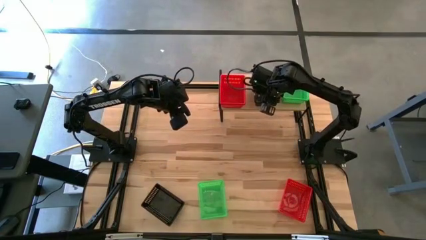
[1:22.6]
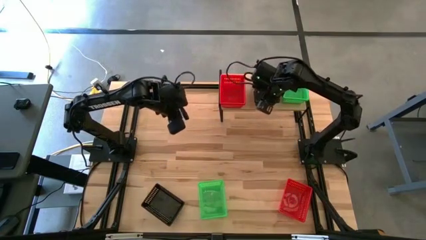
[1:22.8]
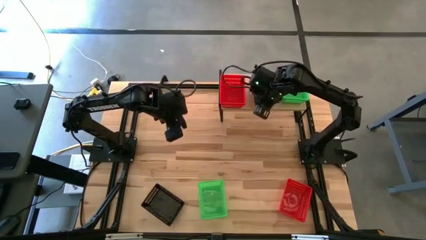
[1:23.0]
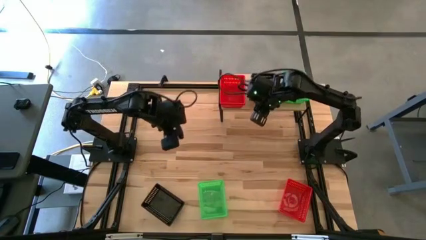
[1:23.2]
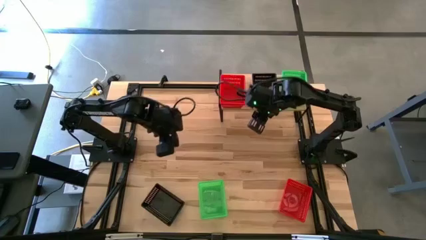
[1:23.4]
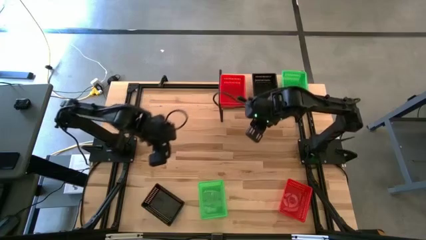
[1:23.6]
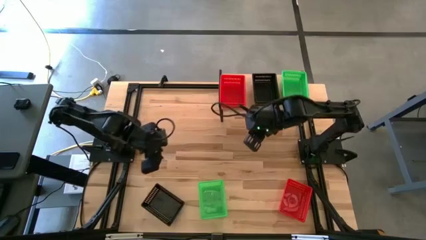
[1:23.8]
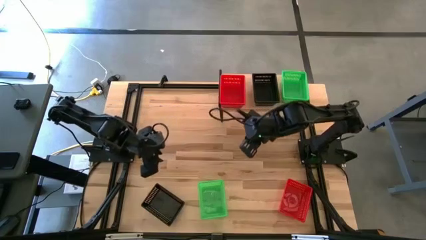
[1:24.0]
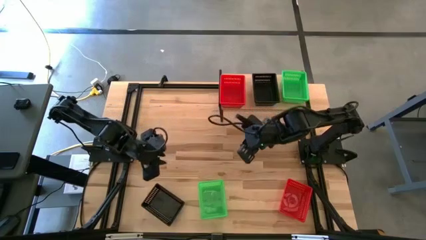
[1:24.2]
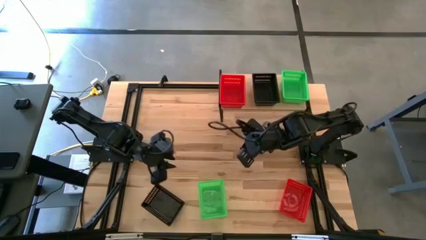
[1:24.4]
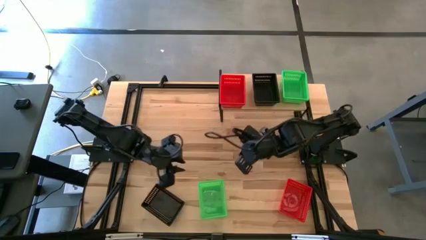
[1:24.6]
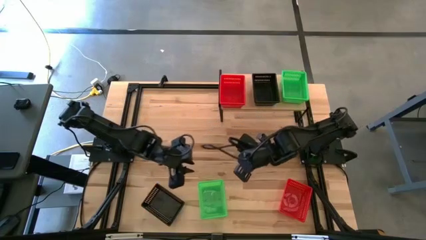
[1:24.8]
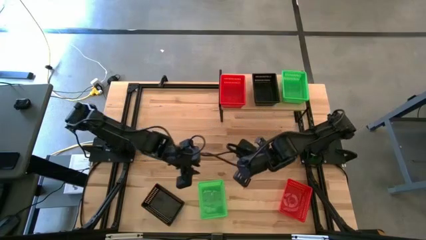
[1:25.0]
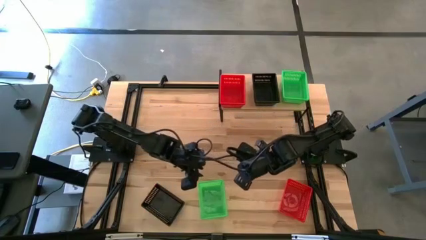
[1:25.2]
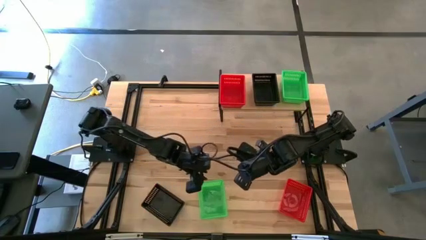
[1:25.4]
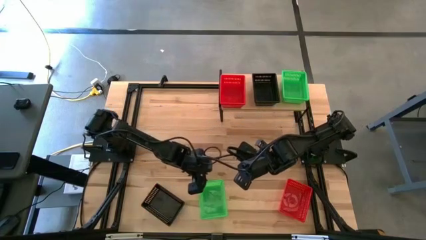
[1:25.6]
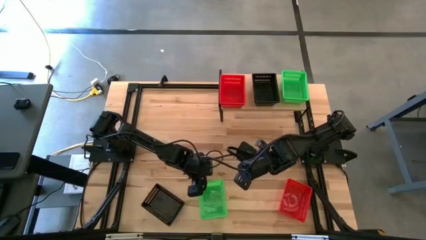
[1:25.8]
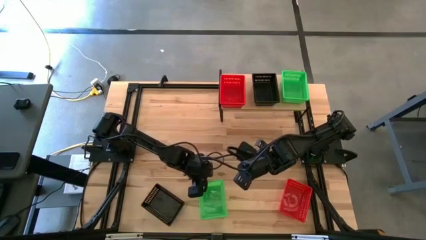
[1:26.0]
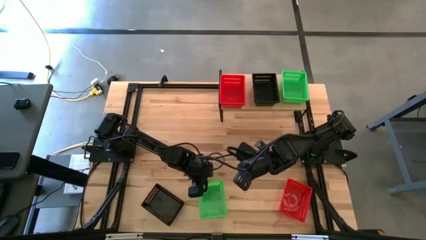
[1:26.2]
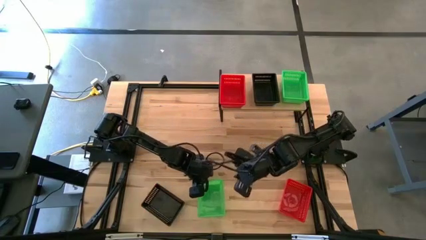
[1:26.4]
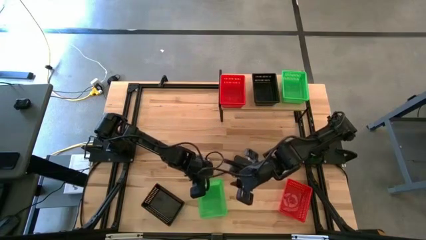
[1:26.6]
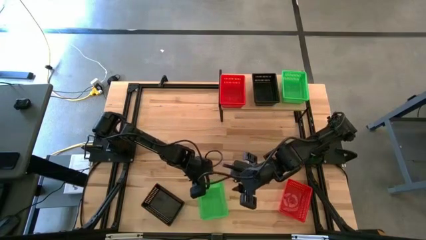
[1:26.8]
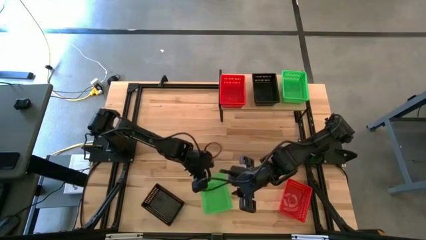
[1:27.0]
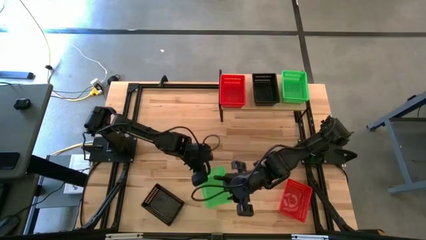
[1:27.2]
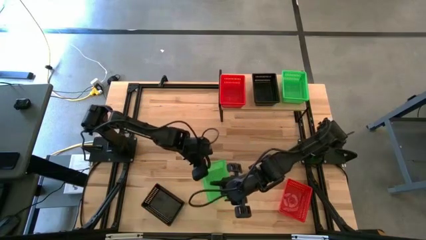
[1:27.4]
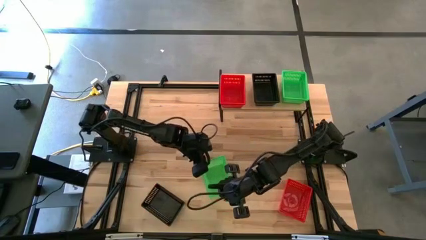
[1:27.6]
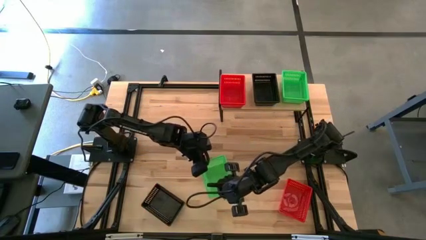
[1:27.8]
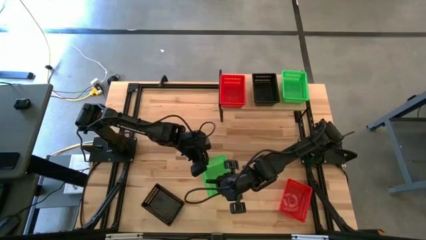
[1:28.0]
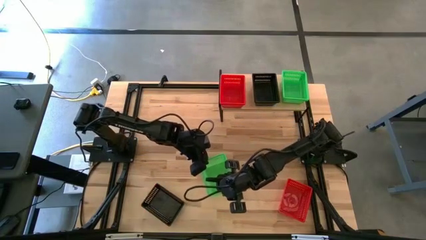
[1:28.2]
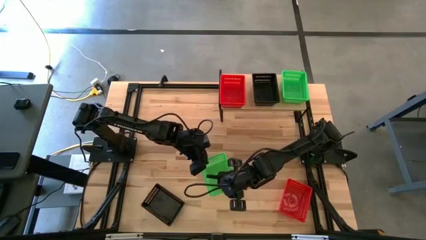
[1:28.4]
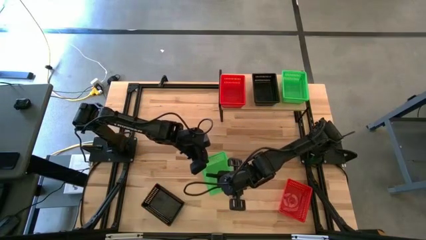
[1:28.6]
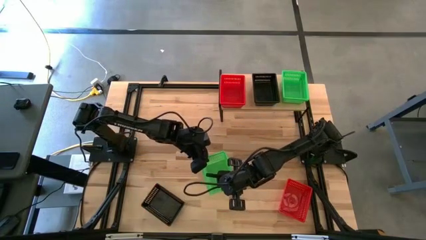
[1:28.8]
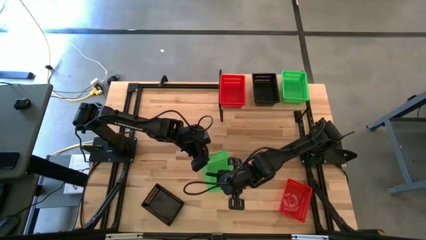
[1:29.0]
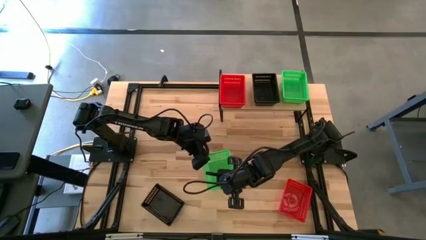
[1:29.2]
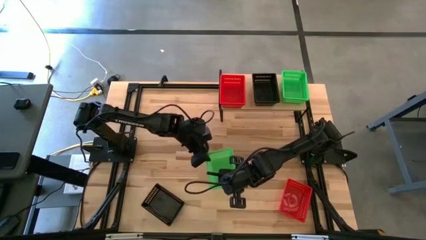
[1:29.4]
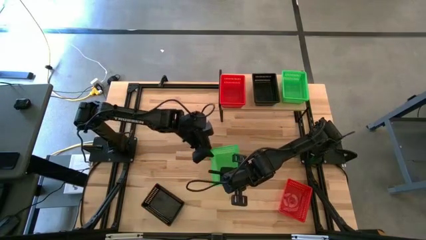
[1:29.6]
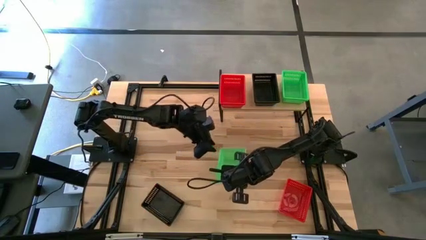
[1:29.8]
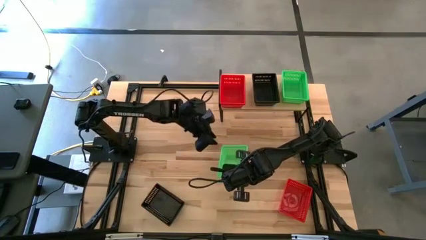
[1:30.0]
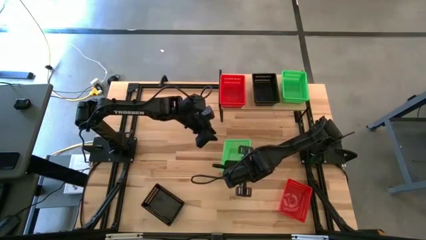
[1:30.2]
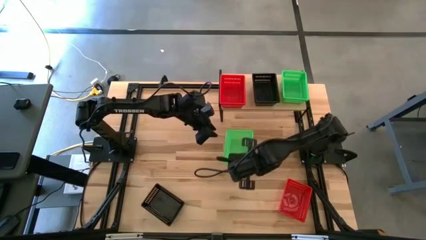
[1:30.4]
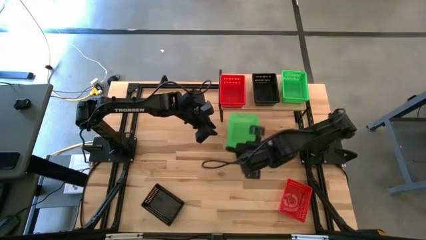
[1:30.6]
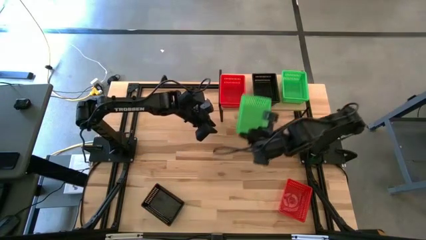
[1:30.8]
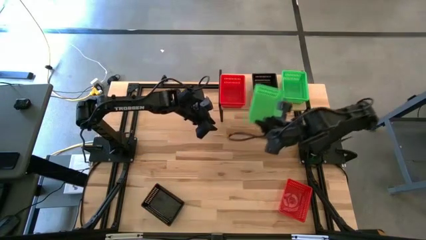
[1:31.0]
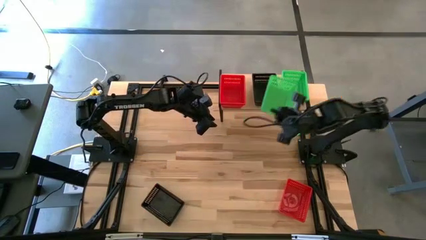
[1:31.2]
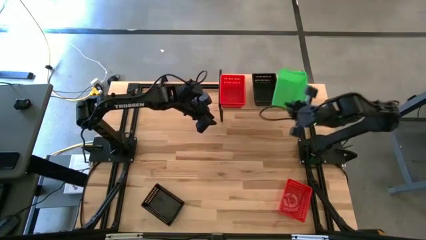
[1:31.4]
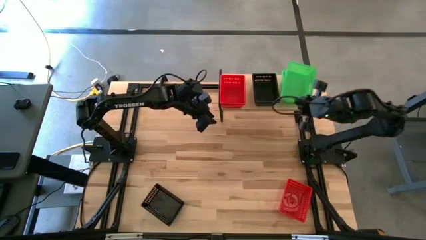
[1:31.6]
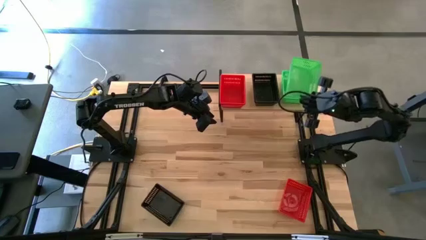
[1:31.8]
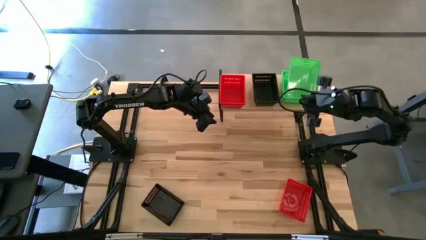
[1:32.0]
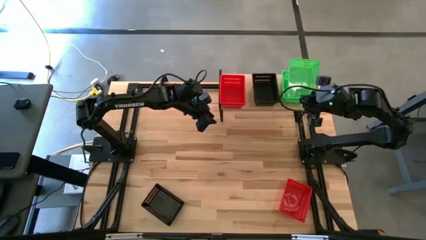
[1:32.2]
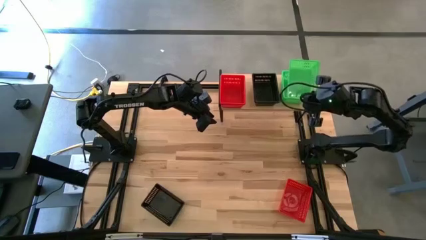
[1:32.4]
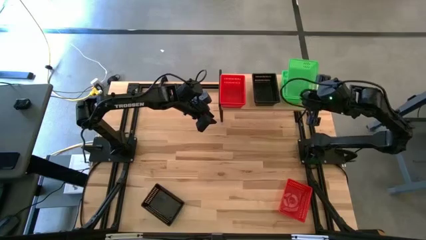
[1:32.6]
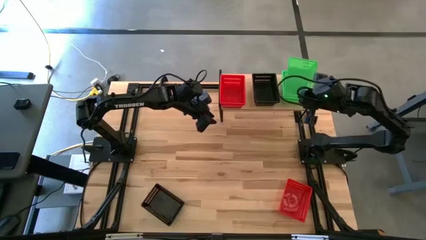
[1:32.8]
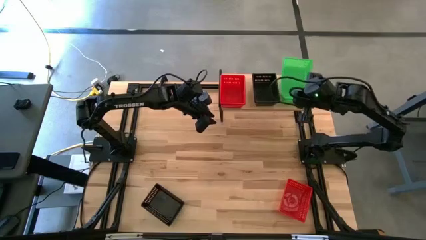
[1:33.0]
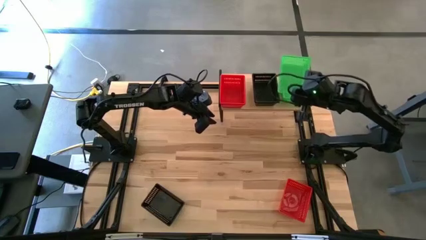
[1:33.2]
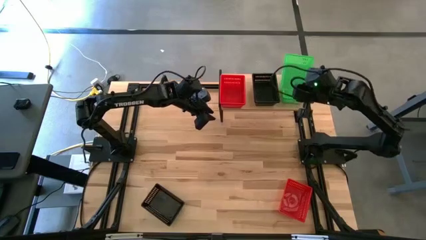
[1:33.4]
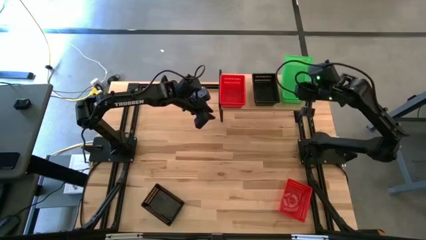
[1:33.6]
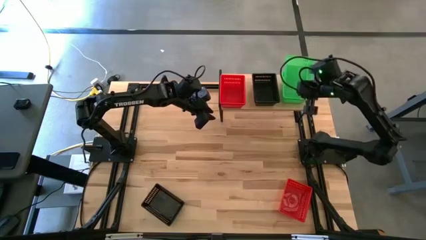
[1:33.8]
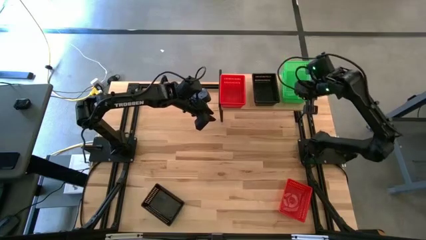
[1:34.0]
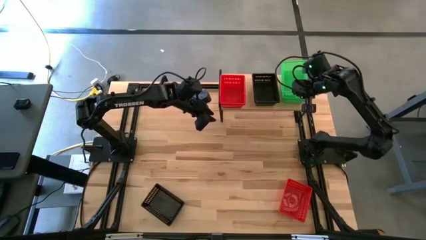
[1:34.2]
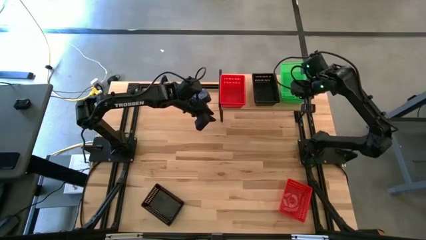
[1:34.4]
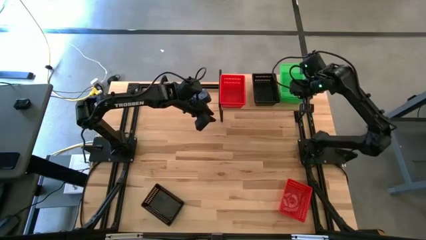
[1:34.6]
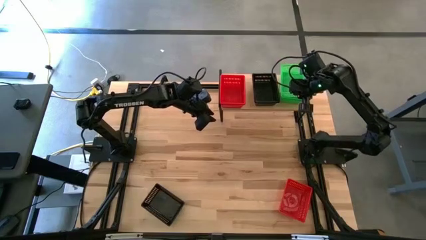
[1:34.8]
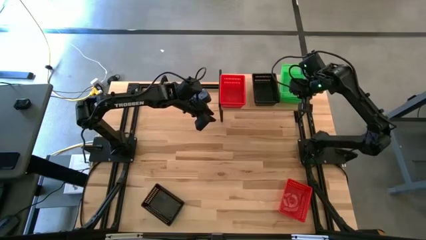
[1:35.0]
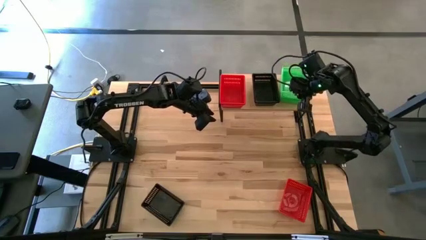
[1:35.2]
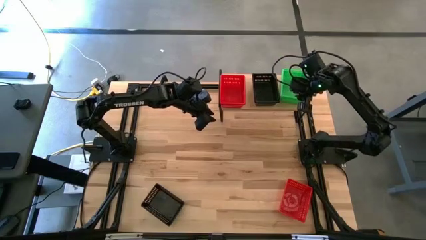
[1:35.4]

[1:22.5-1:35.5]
Task: Stack baskets on shelf by color
Stack the green basket on top of the other green baskets on the shelf

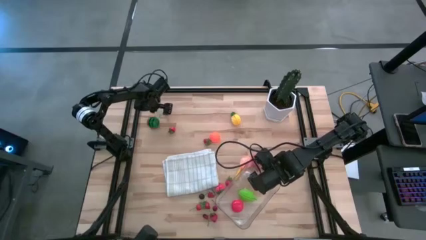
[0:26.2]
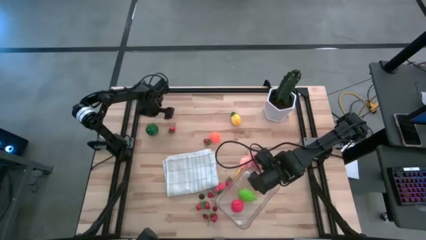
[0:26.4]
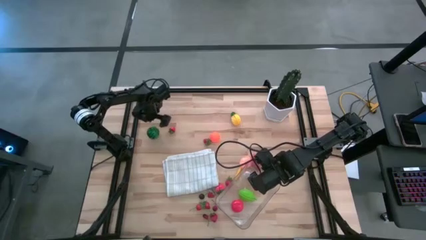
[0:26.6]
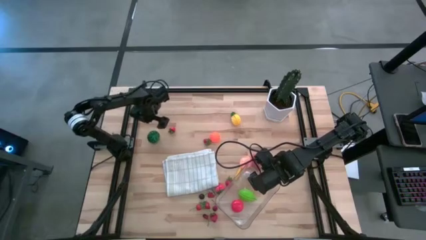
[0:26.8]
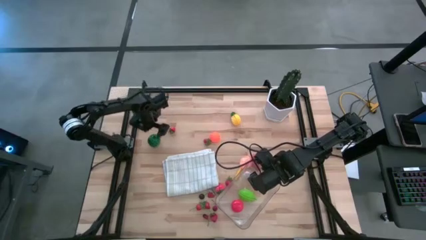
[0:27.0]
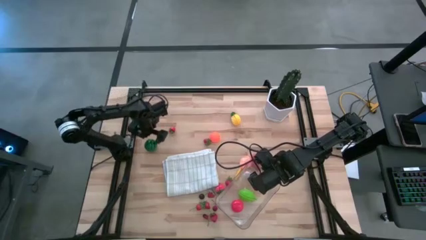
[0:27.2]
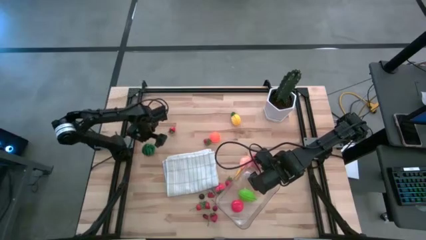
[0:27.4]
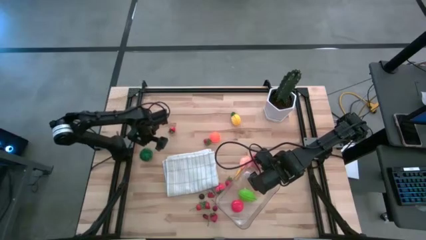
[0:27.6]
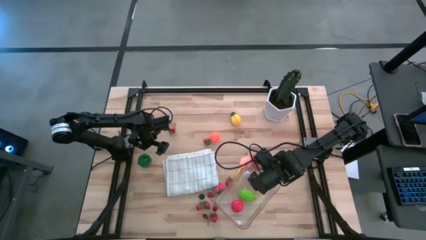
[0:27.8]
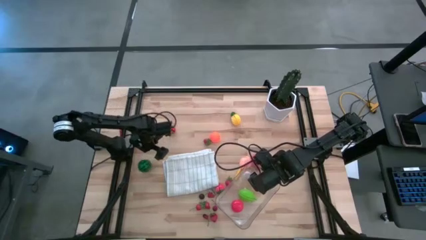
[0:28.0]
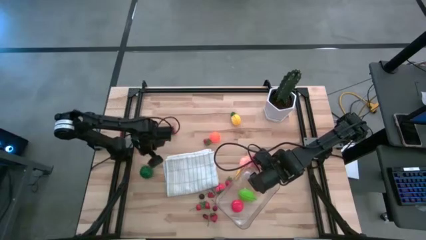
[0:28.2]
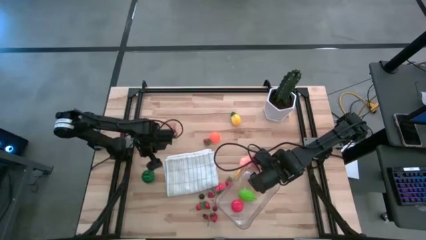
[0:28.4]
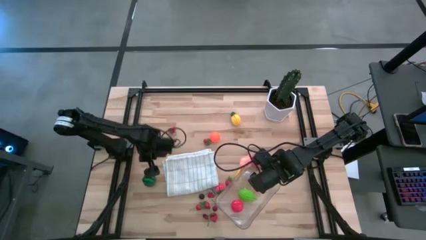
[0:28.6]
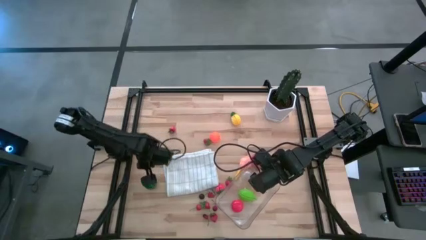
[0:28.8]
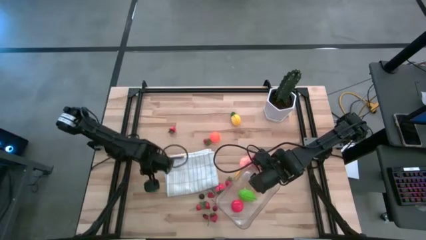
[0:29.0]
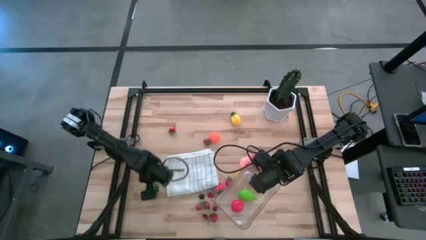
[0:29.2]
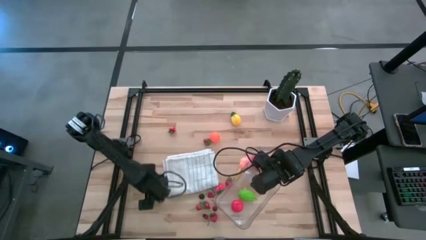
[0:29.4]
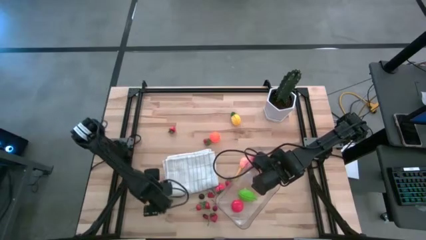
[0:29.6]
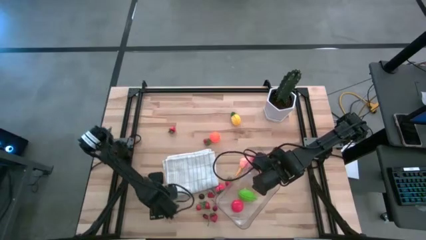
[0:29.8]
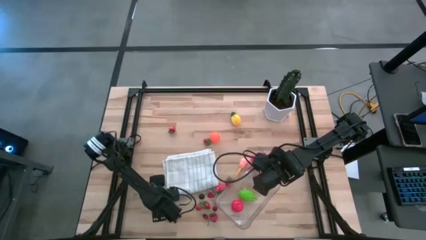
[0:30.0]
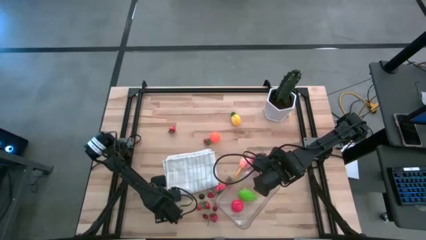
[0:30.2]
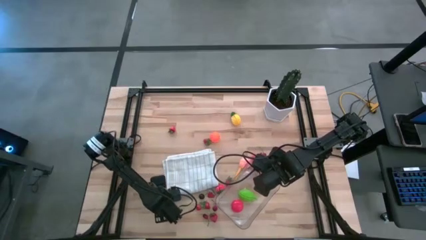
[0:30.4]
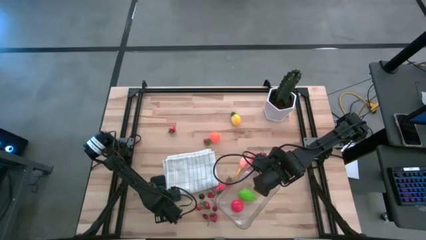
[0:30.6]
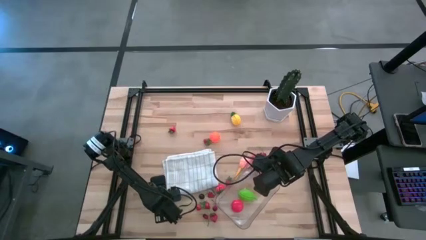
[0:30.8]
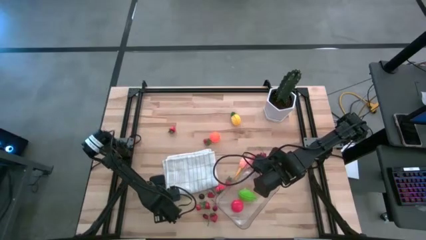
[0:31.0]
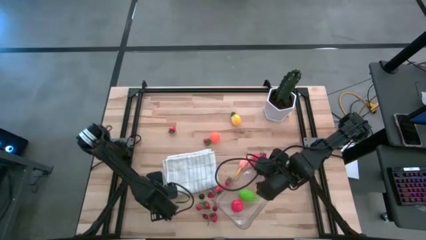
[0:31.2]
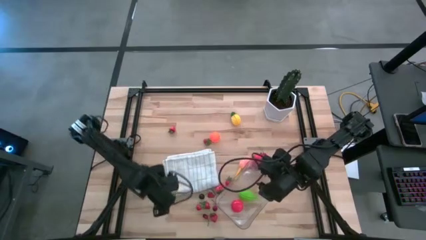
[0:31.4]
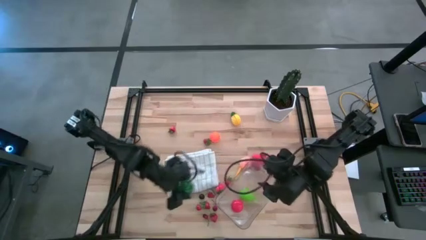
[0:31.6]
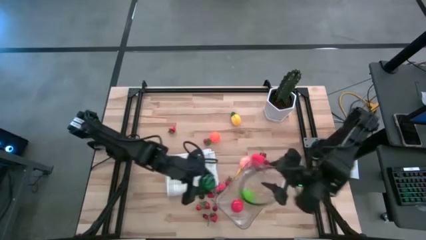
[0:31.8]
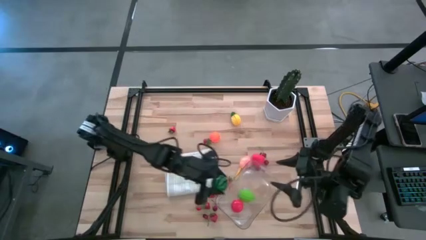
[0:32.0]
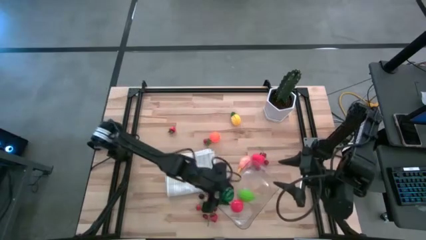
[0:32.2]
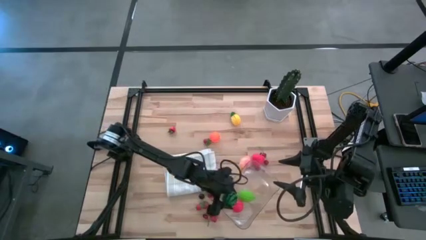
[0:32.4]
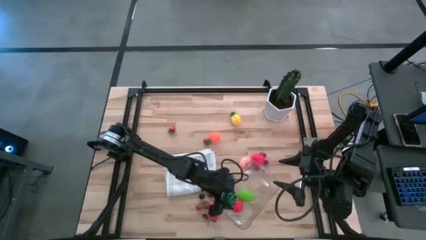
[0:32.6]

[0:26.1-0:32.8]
Task: Pick and placing Produce into tupperware
Put the watermelon into the transparent bin
